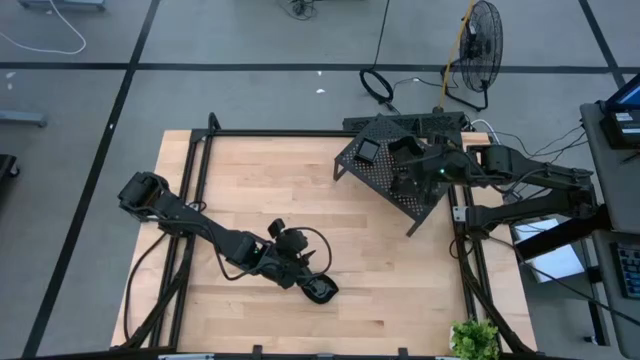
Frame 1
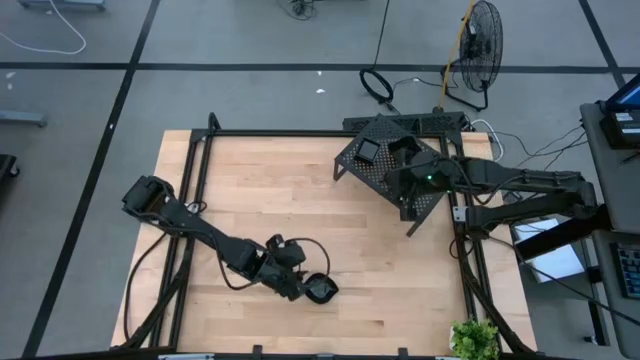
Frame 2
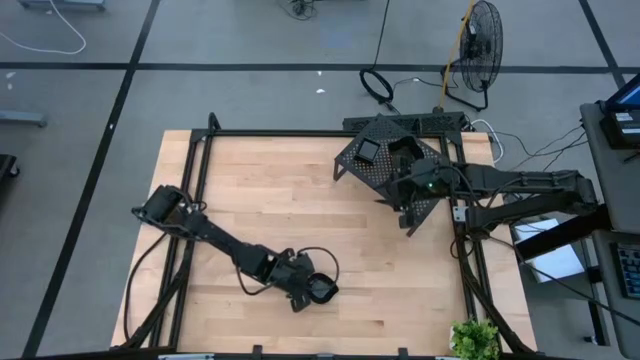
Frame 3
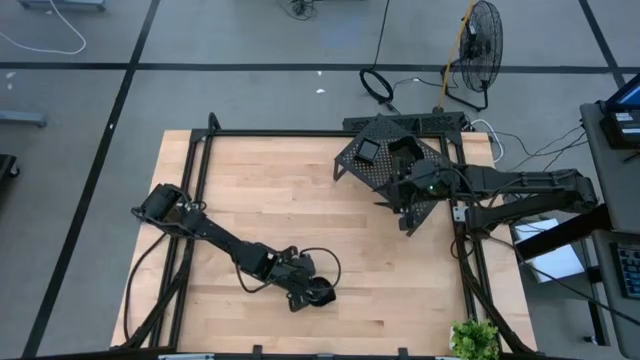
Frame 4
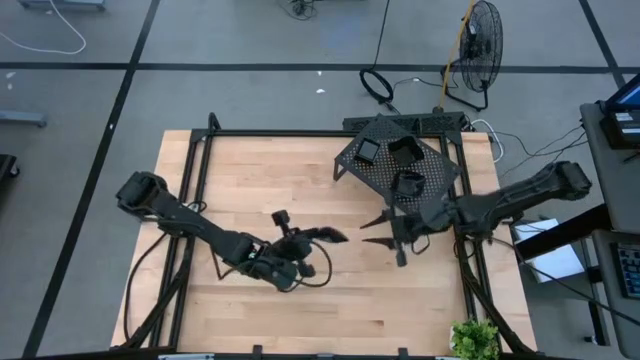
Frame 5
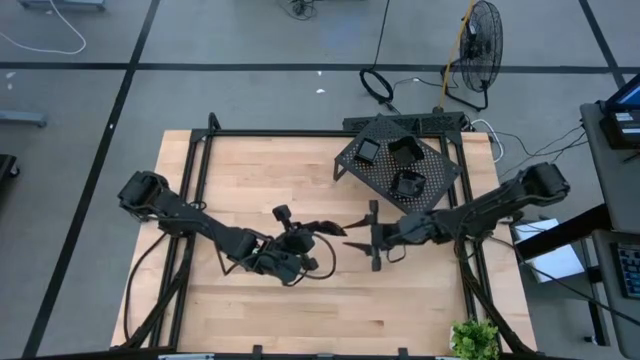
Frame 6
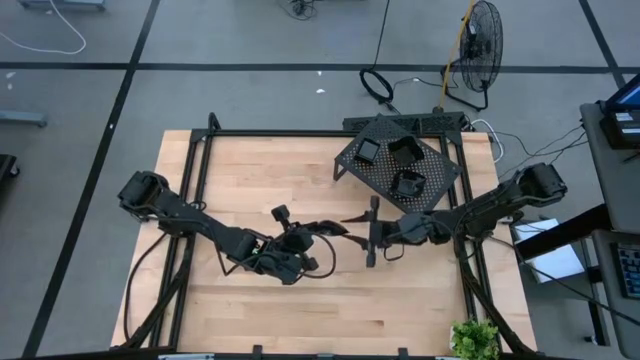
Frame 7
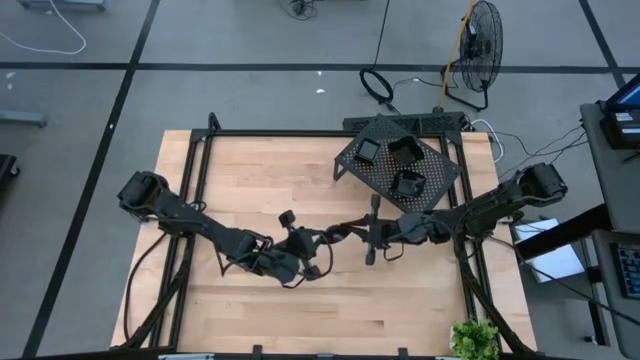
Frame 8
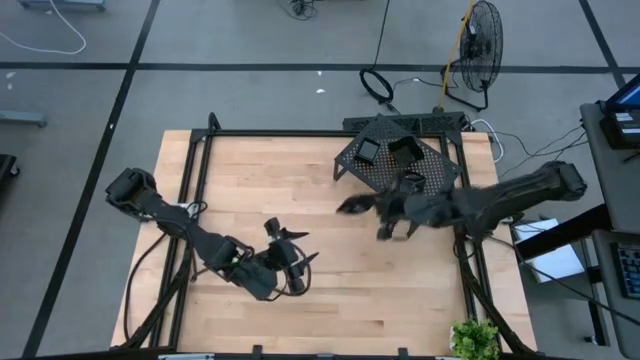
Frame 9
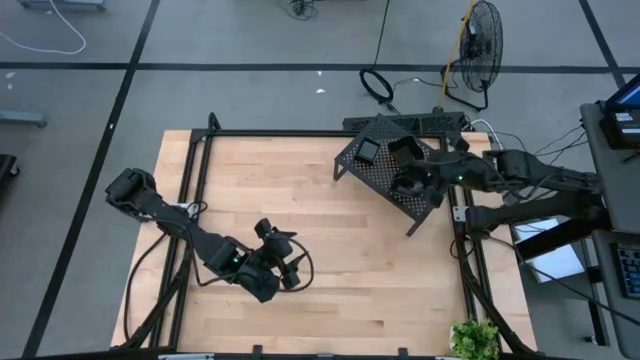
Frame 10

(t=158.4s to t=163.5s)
Task: Pick & Place Mini shaped plates
Stack the black leaf shaped plate on the black leaf shaped plate on the shelf

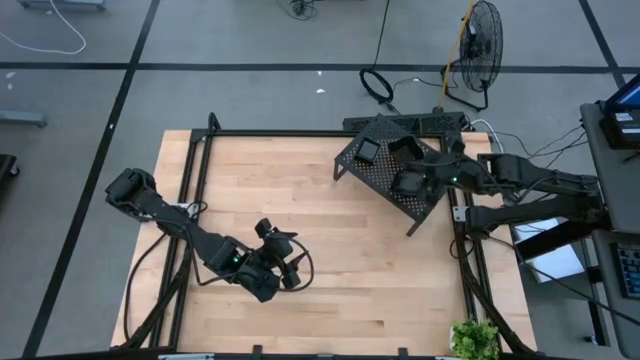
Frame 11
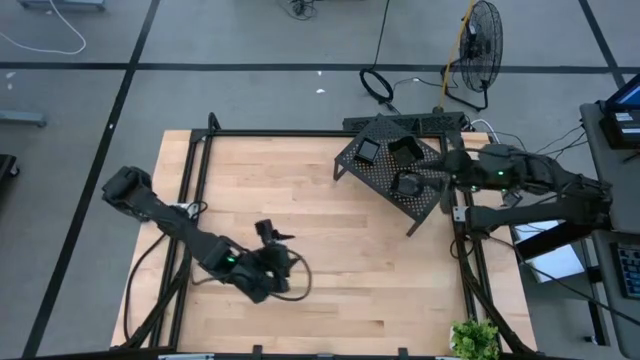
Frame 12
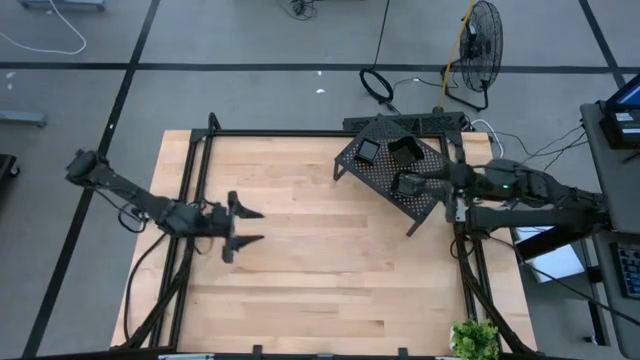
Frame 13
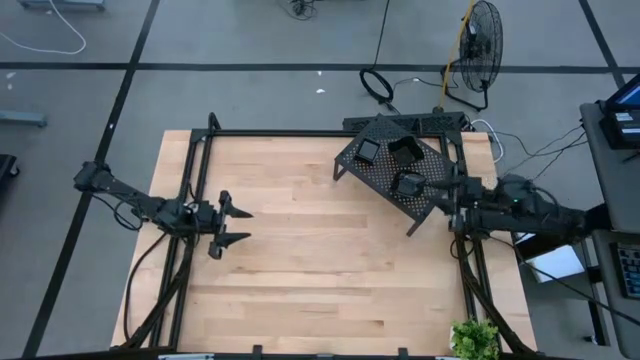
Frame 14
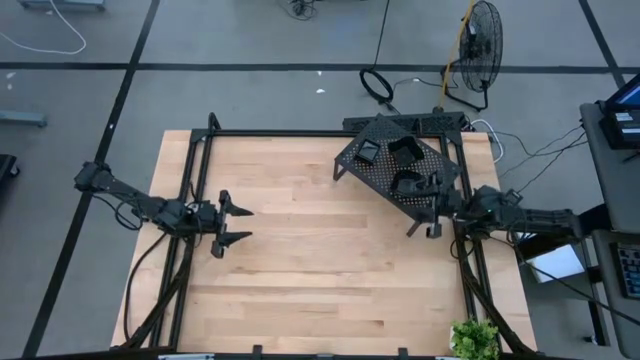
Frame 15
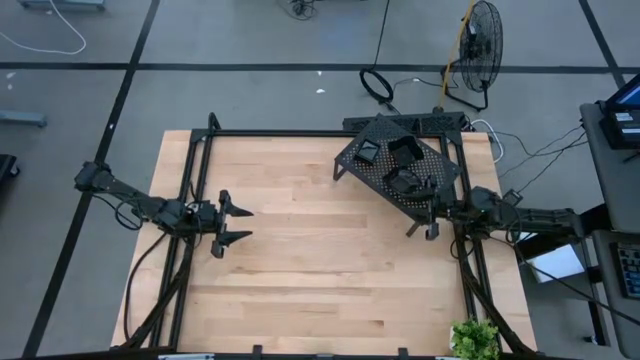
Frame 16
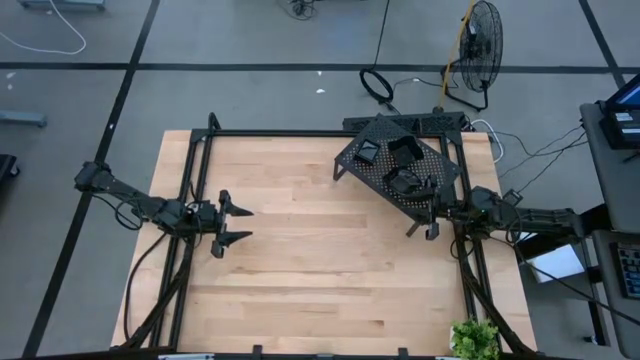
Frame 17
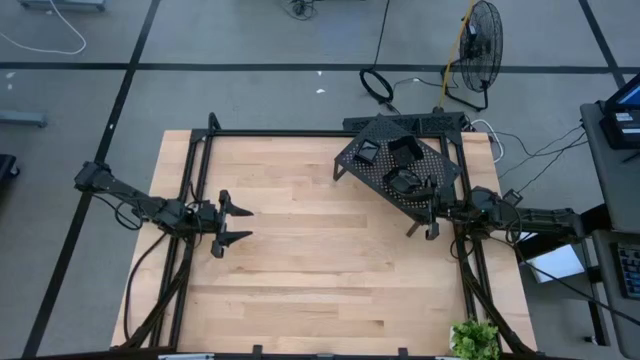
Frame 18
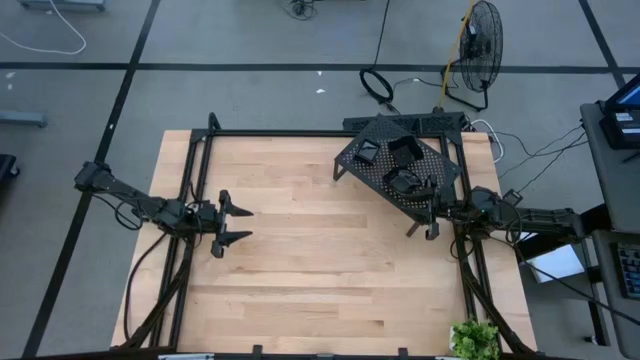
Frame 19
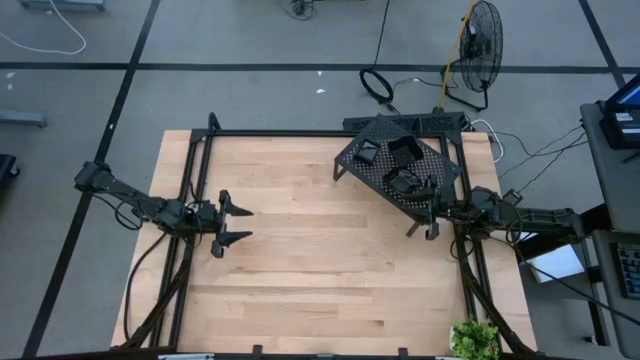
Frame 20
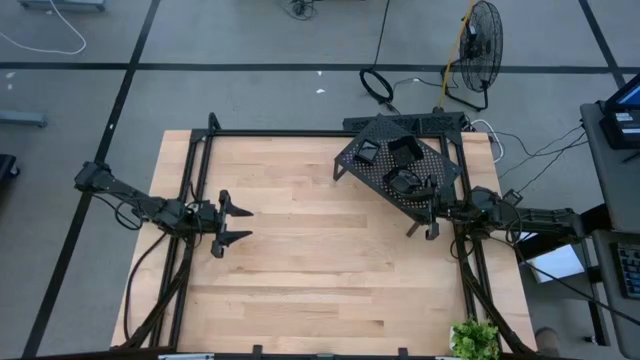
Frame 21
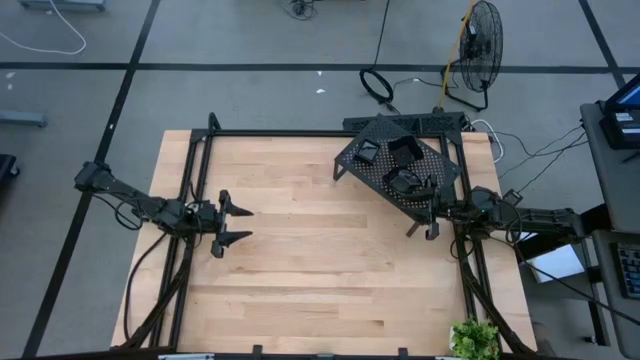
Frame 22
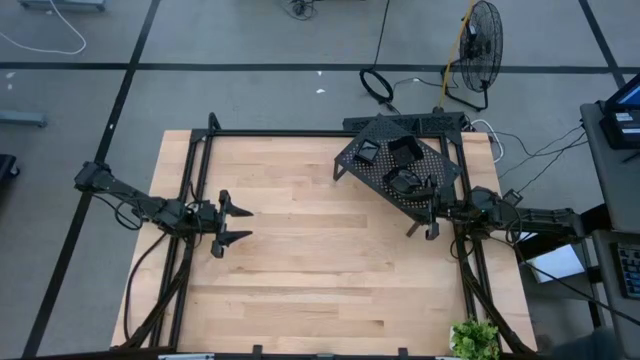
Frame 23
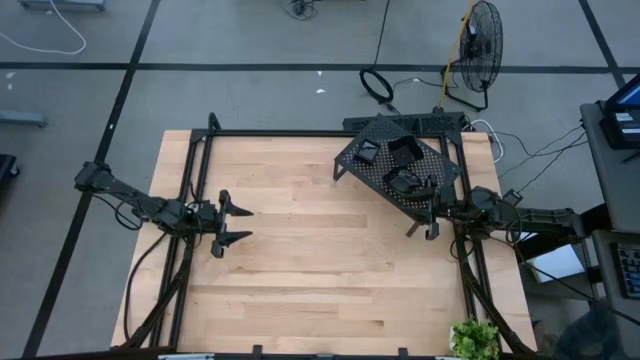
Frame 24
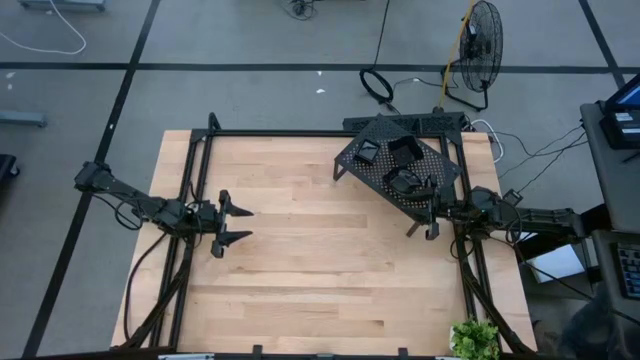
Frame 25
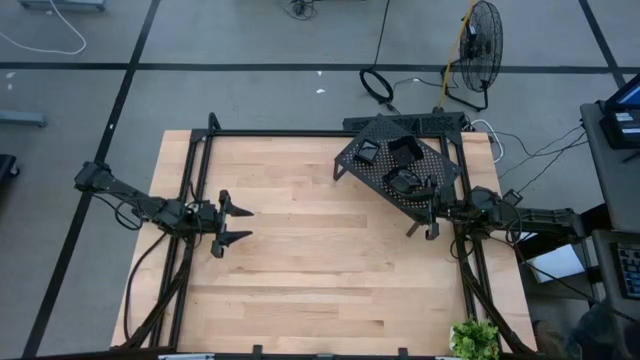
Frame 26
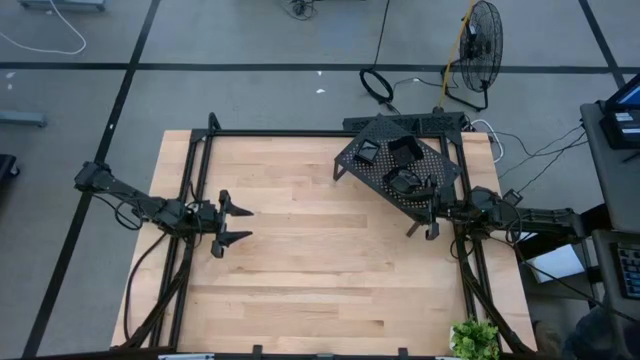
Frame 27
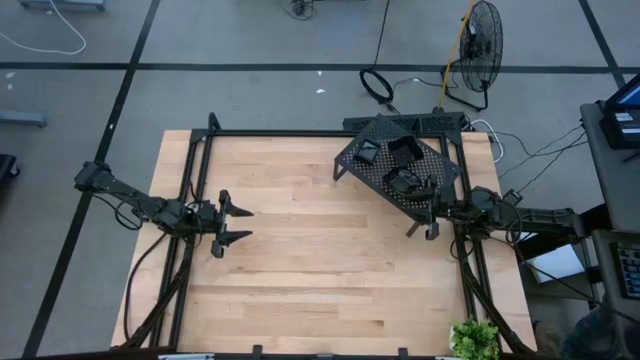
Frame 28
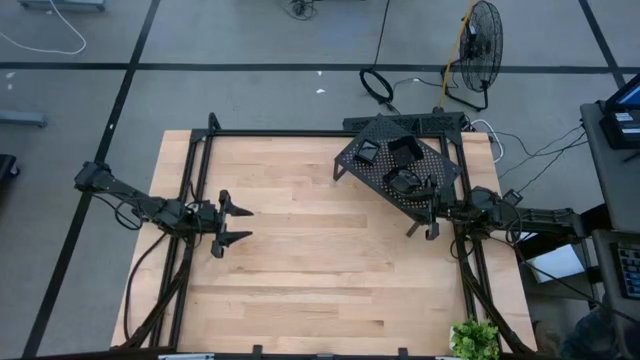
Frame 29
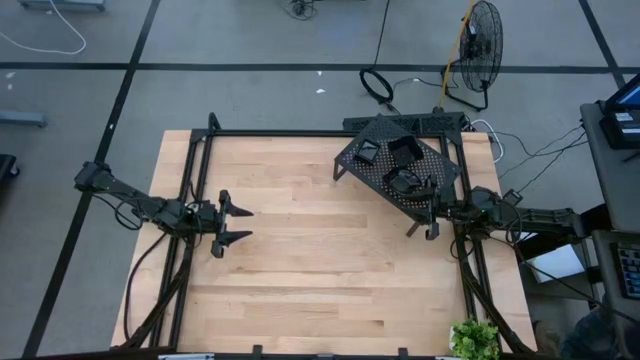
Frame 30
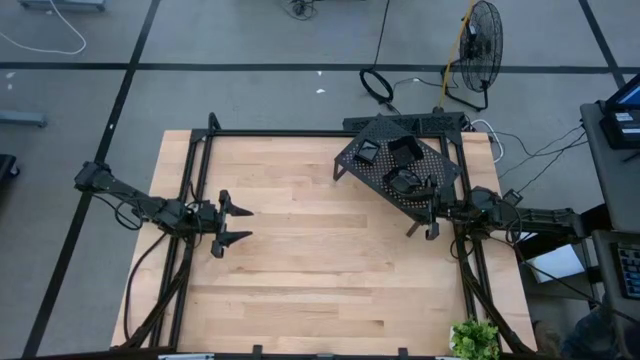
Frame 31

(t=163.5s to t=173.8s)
Return to Home Position

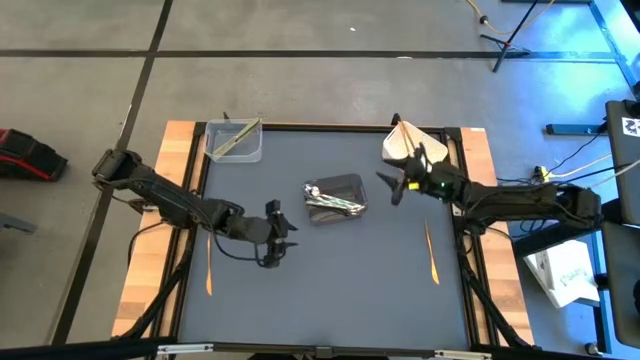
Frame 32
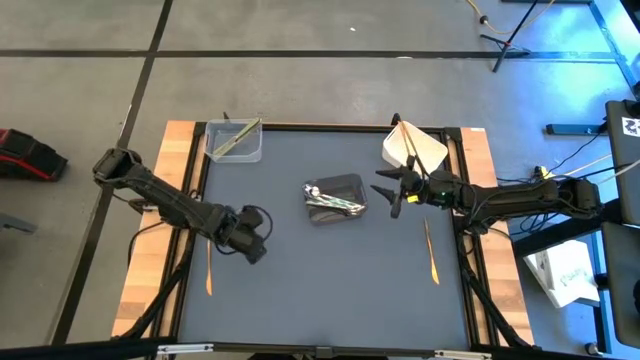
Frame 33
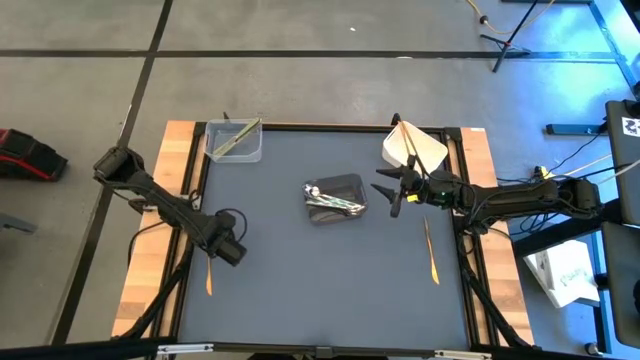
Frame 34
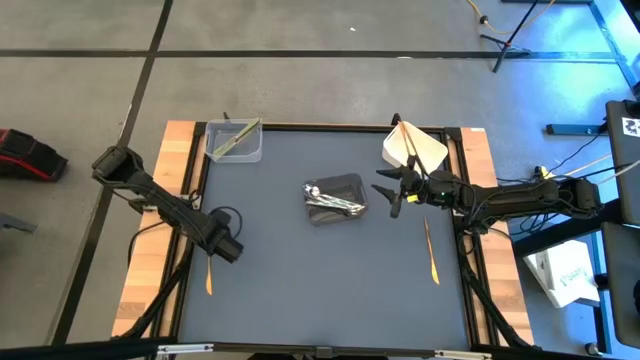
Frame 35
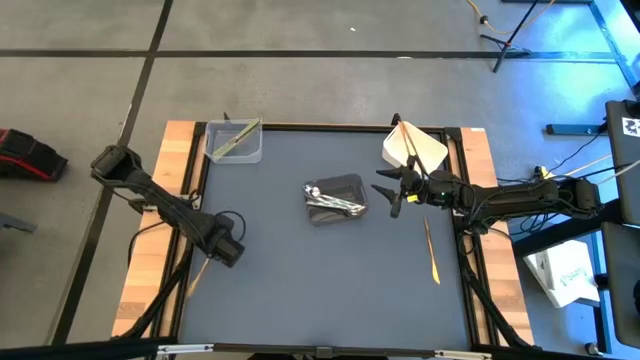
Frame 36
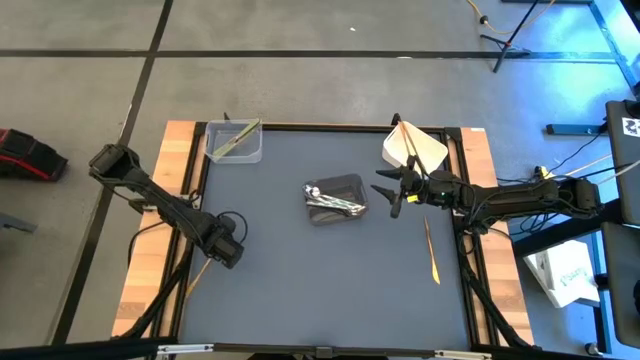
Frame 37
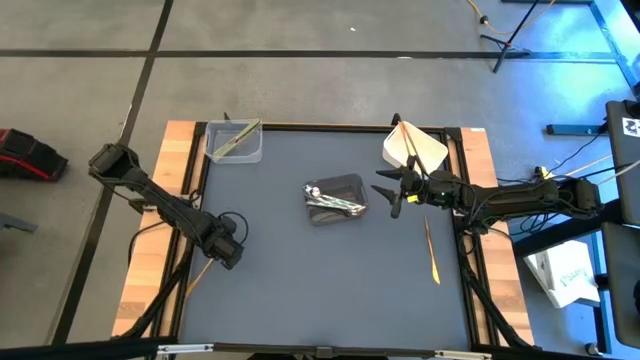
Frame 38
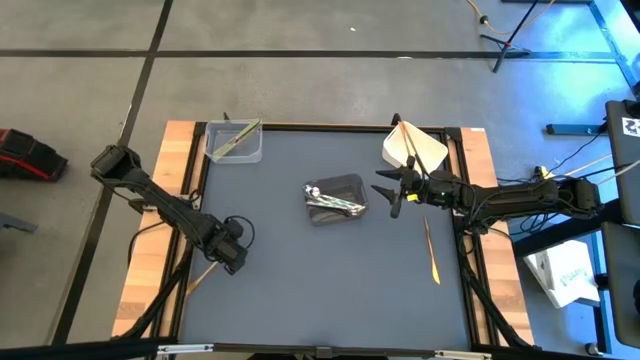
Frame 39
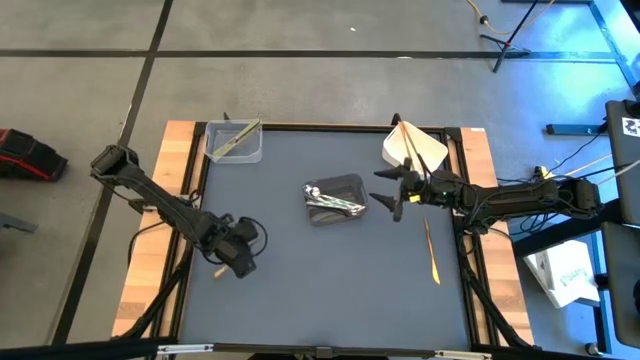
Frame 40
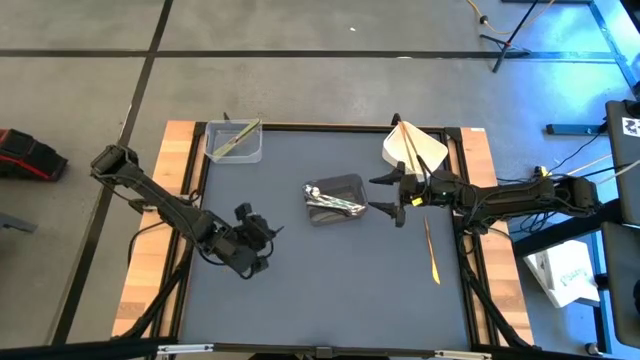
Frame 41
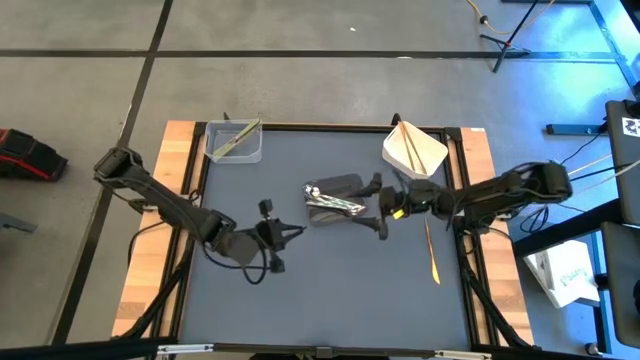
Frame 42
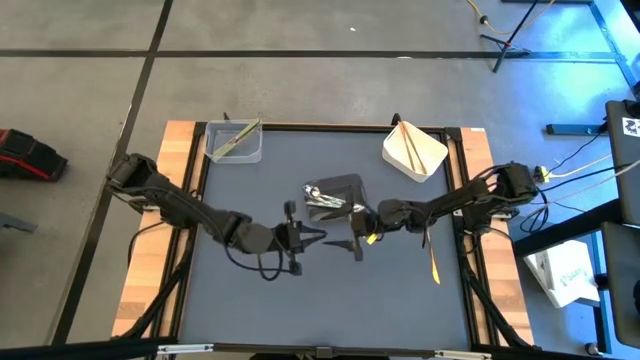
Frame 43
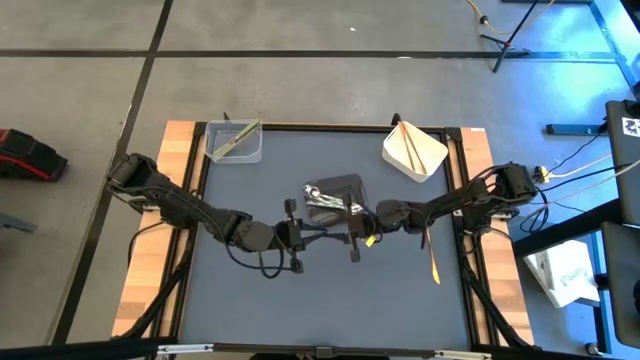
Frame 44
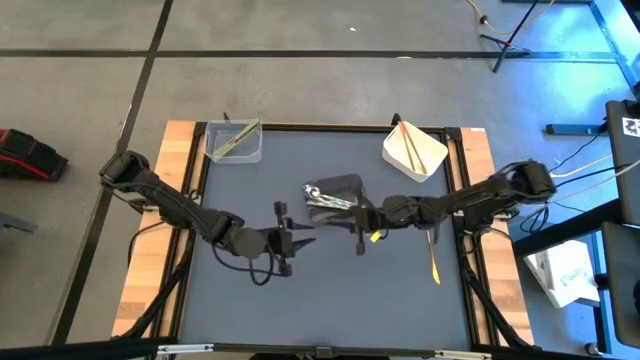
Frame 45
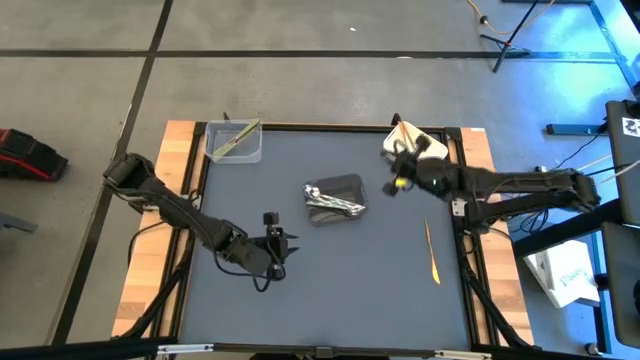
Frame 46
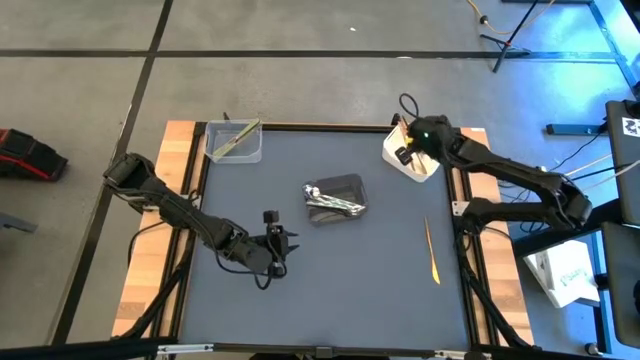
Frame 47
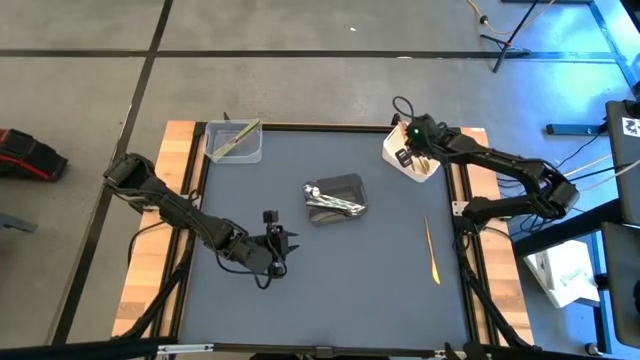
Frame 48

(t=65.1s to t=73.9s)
Task: Sort silverware by color (type)
Put the left gold table knife into the white bin
